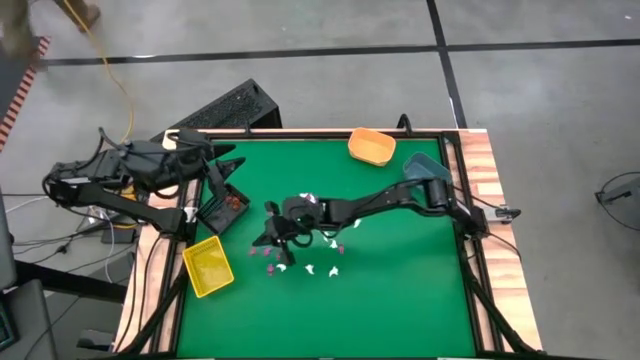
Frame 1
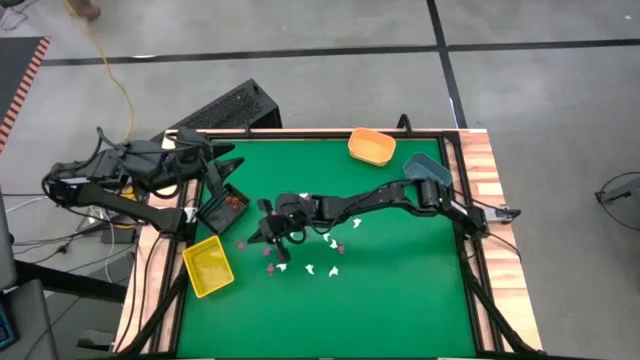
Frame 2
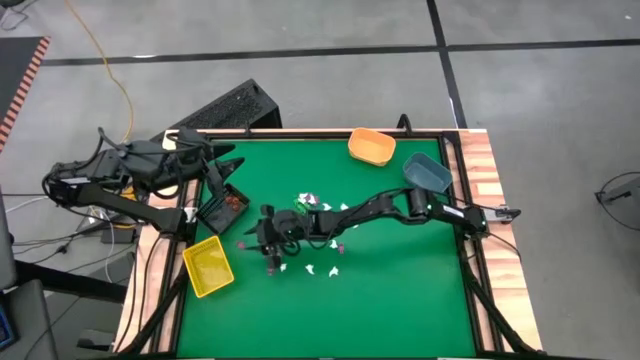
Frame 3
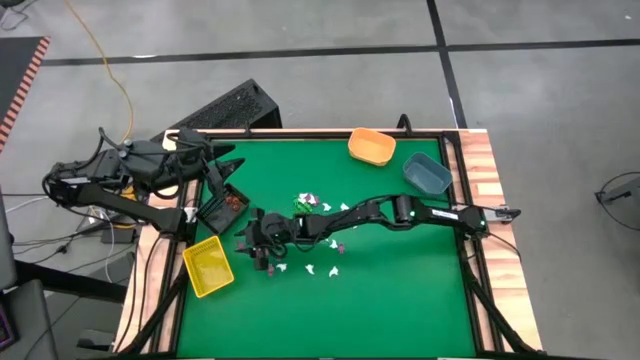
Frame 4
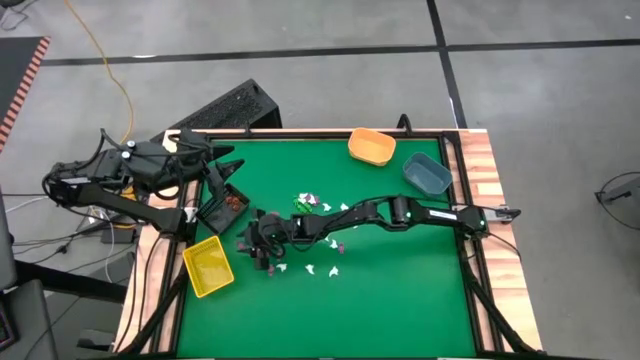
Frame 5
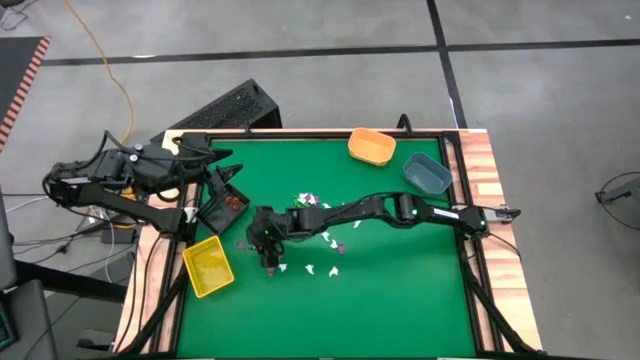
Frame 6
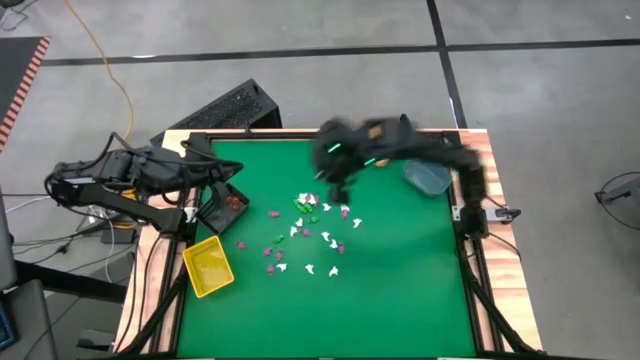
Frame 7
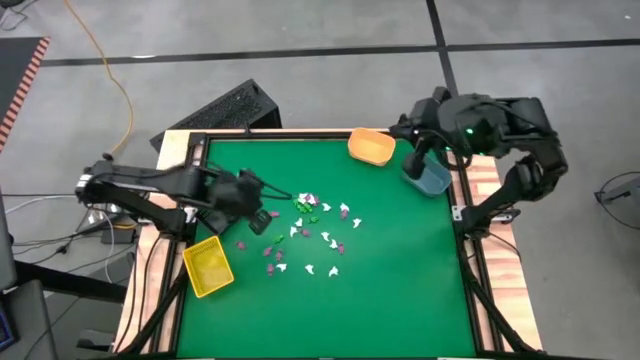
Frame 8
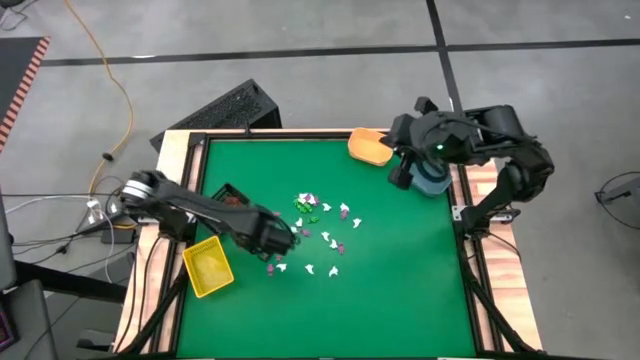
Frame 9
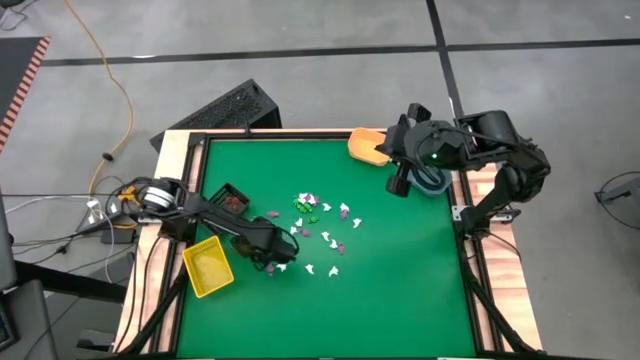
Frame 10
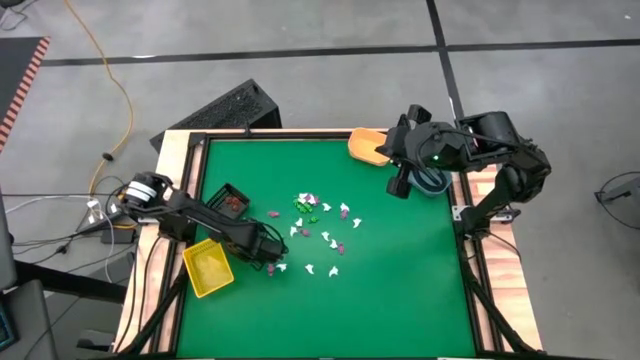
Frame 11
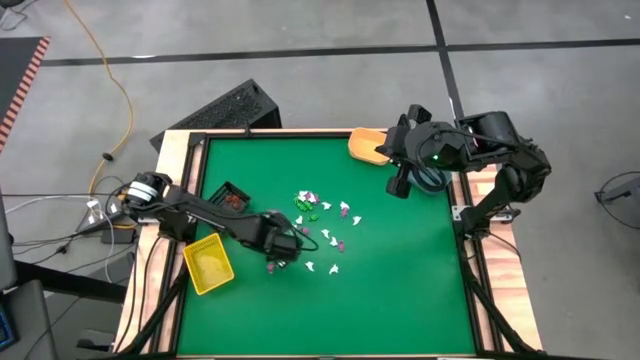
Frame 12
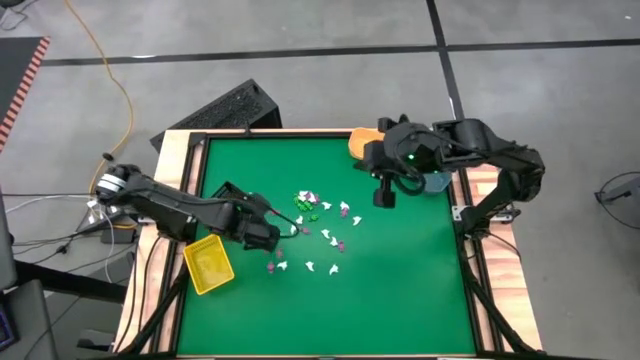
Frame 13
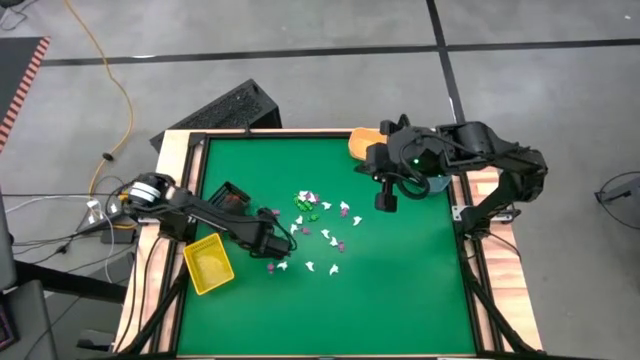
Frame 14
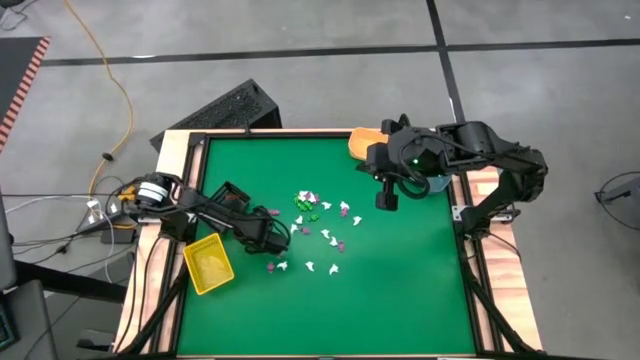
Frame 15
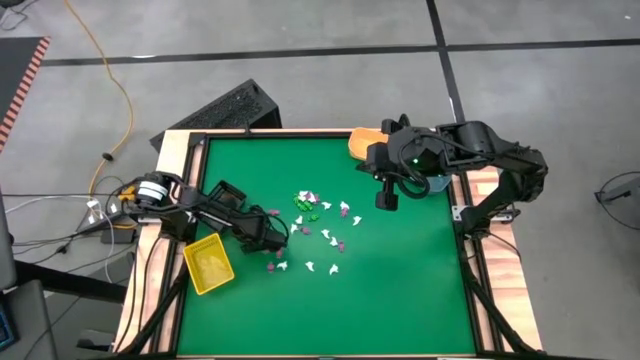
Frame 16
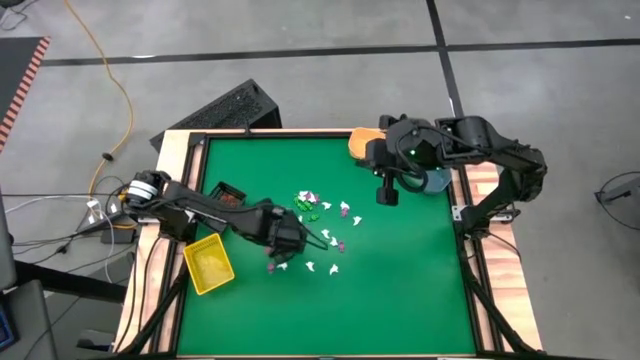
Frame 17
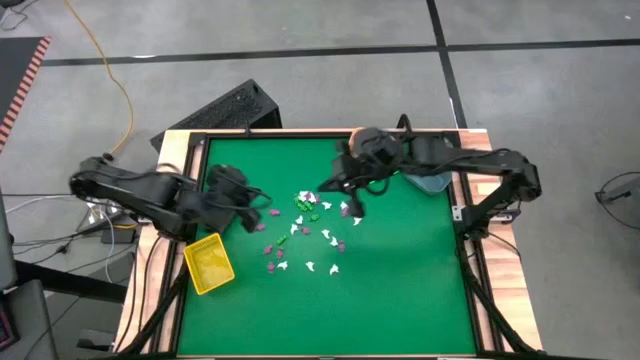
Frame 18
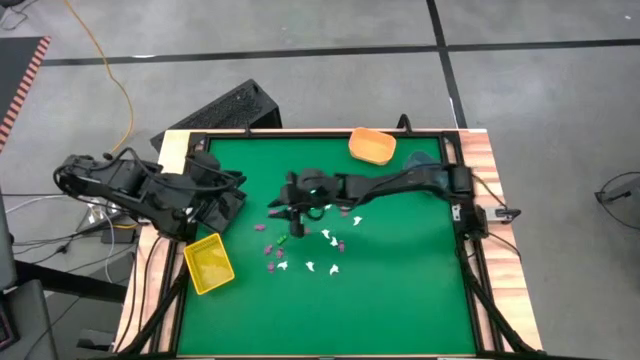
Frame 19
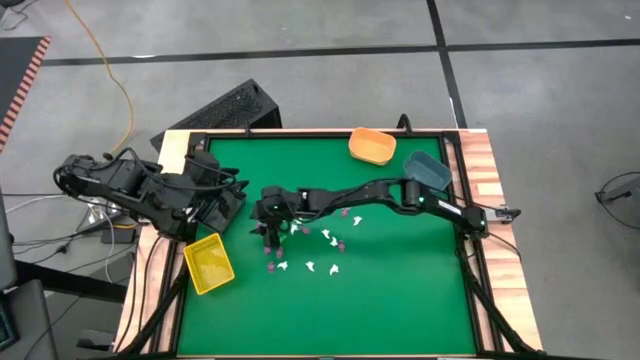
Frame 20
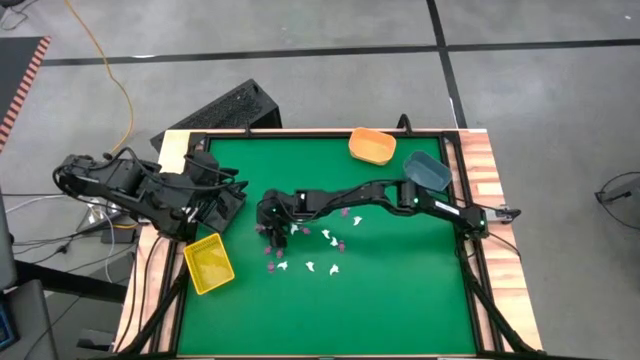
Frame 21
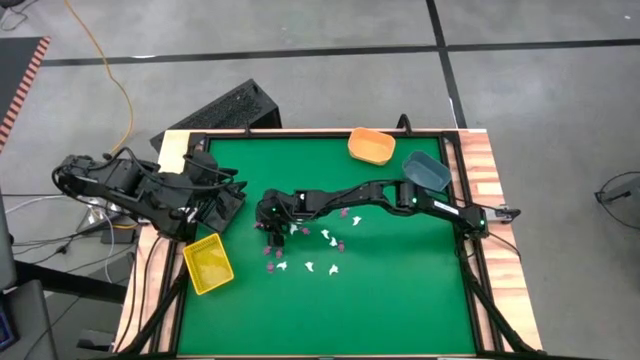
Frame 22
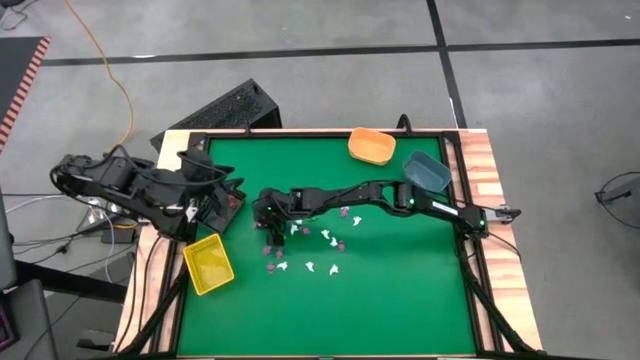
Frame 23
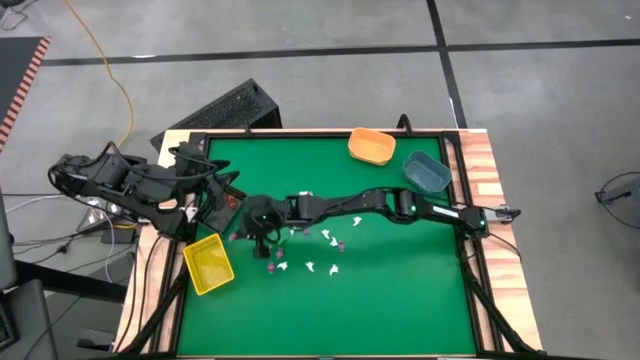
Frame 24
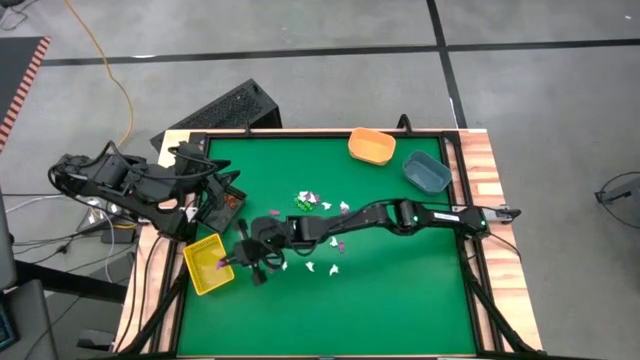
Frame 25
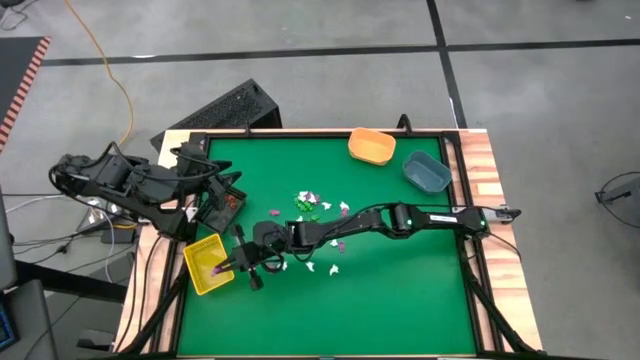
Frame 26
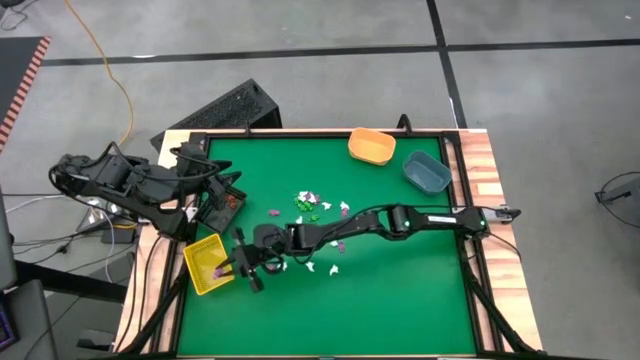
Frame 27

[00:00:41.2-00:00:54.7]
Task: Sort Halloween decoration
Put the pink skeleton toy into the yellow bin

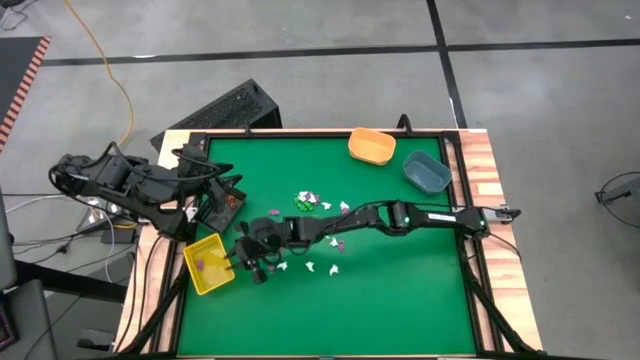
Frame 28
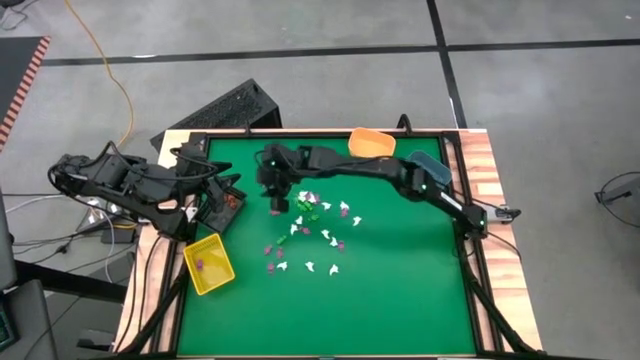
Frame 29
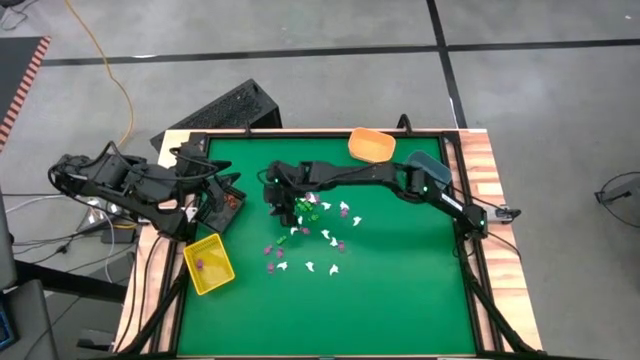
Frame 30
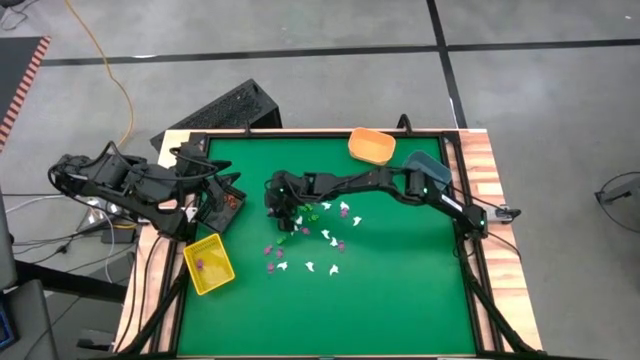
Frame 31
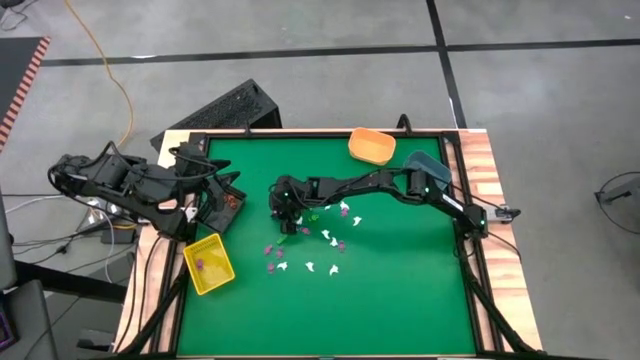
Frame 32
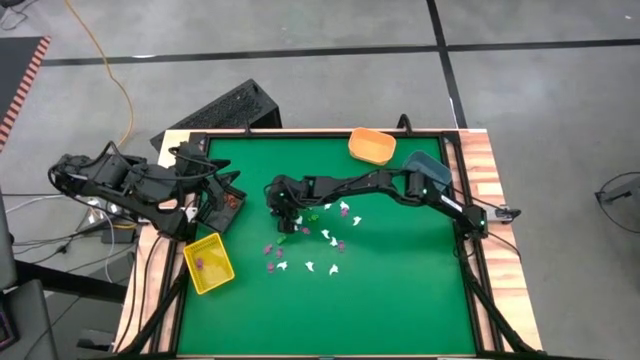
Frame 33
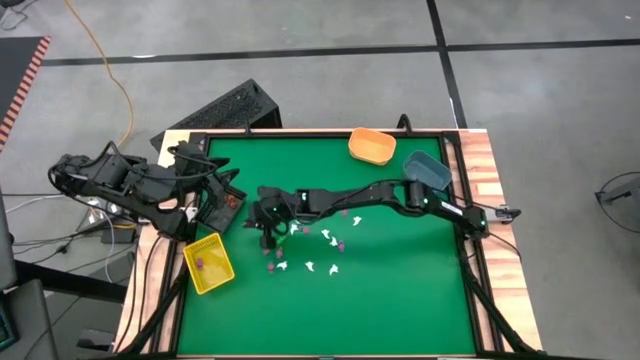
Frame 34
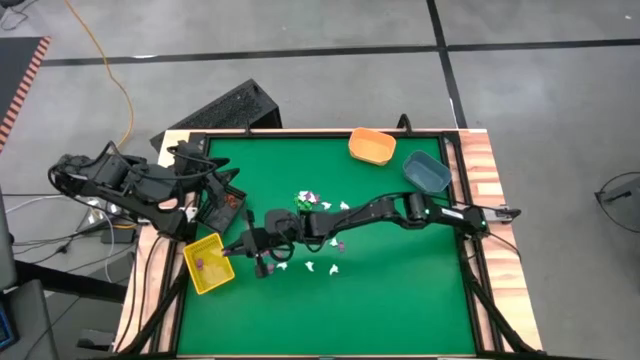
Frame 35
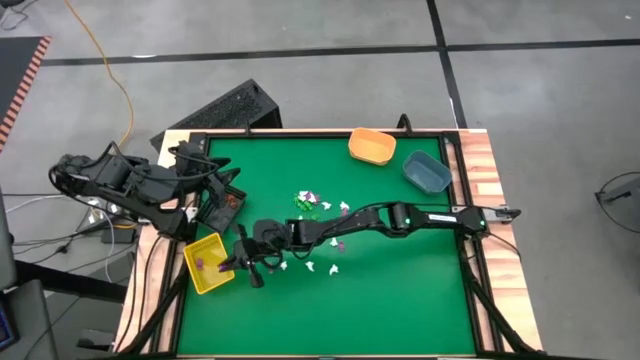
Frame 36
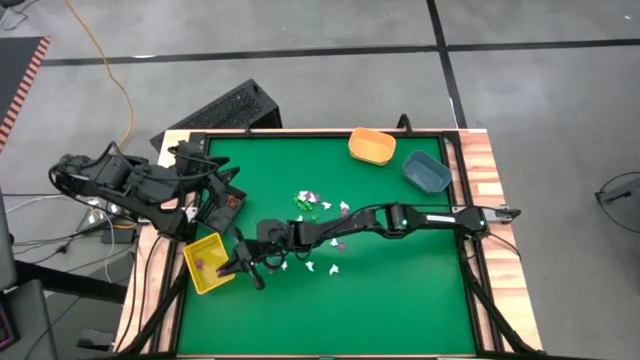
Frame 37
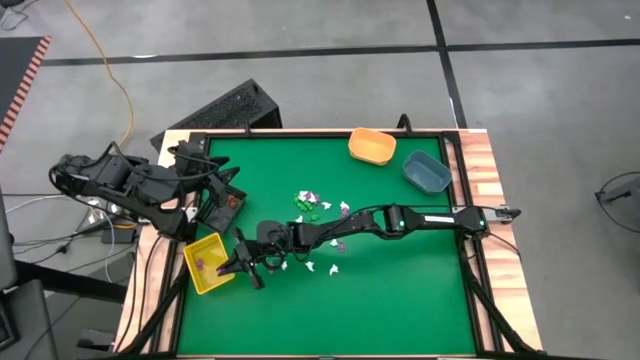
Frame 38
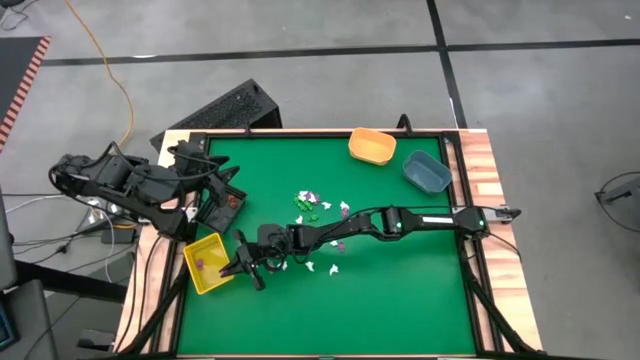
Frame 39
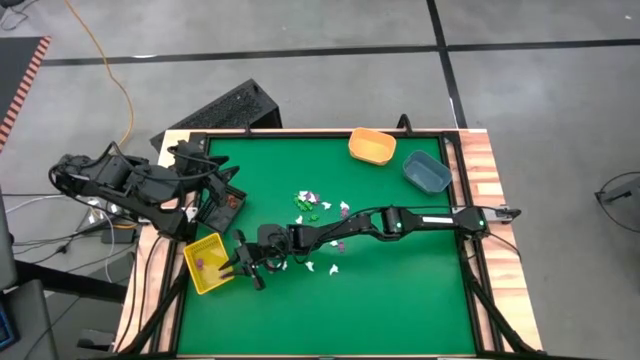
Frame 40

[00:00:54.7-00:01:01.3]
Put the pink skeleton toy into the yellow bin

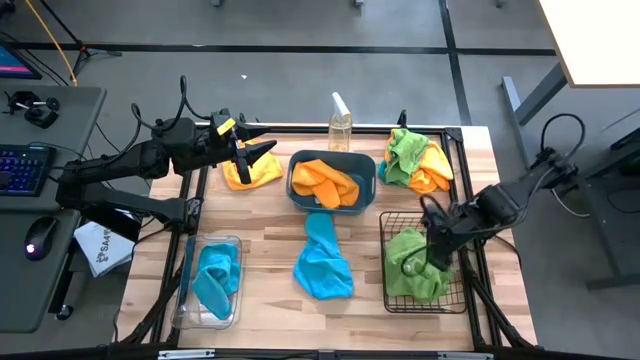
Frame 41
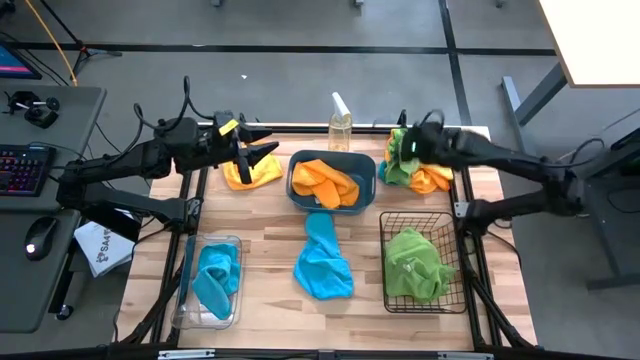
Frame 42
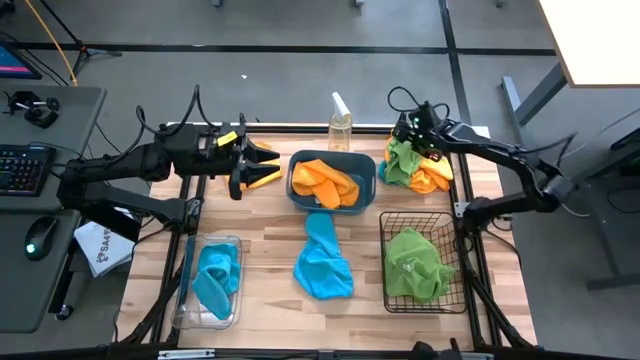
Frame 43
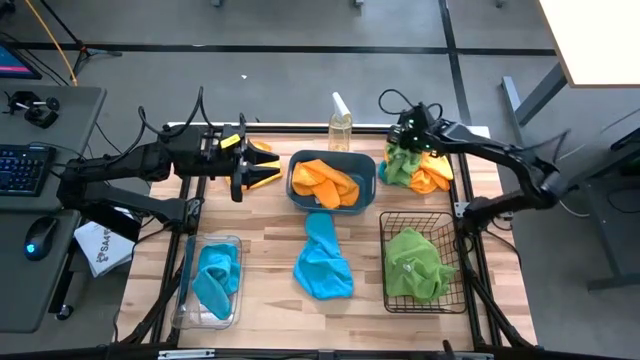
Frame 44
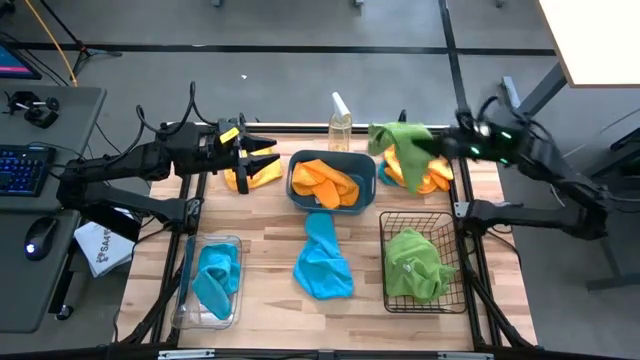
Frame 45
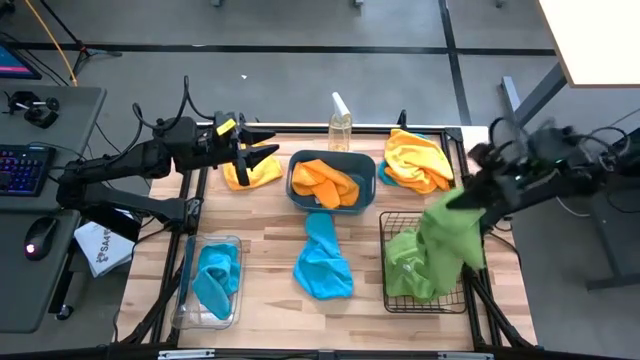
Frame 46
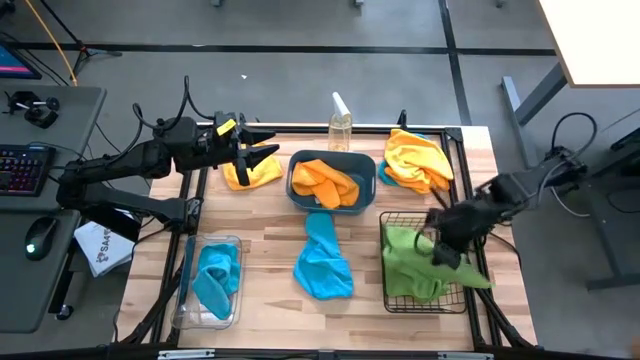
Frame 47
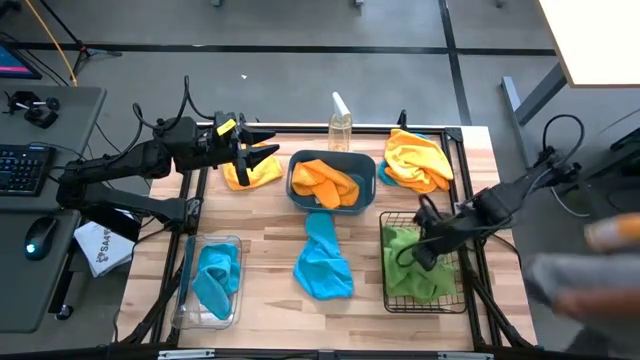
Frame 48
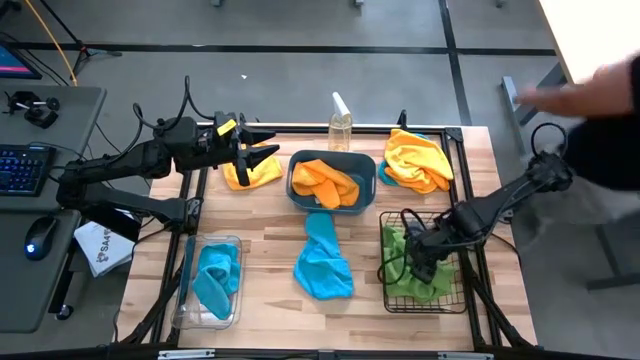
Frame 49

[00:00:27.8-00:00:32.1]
Task: Sort microfiber towel by color & place in baskets
Put the green towel into the black wire basket
